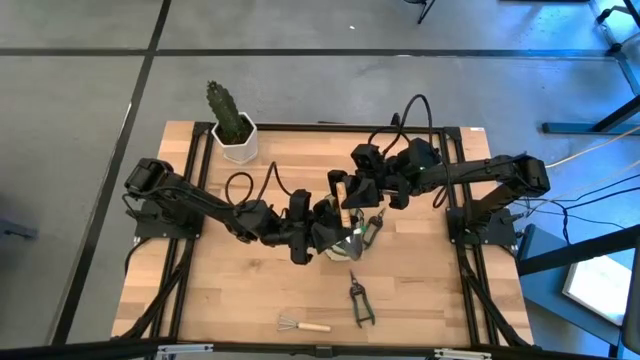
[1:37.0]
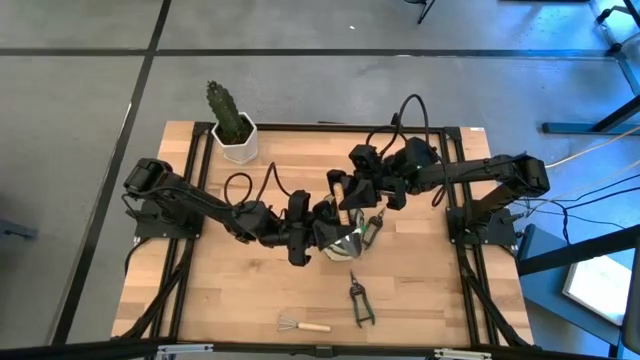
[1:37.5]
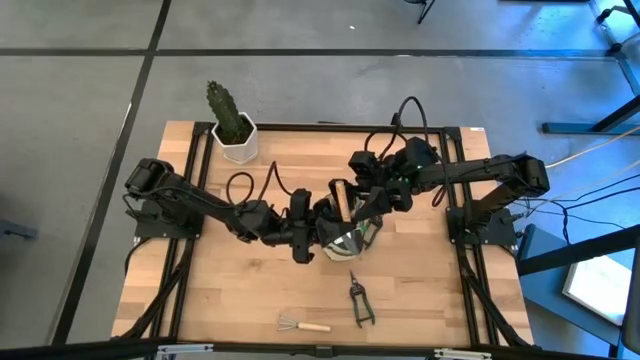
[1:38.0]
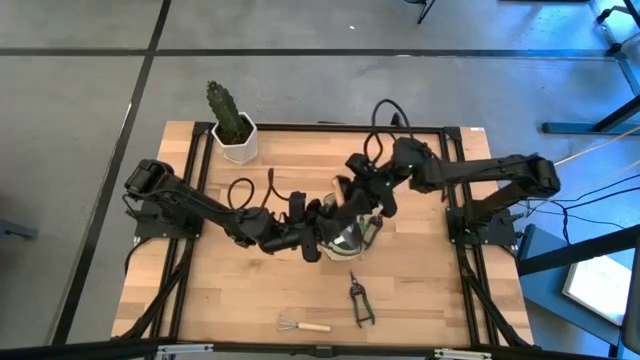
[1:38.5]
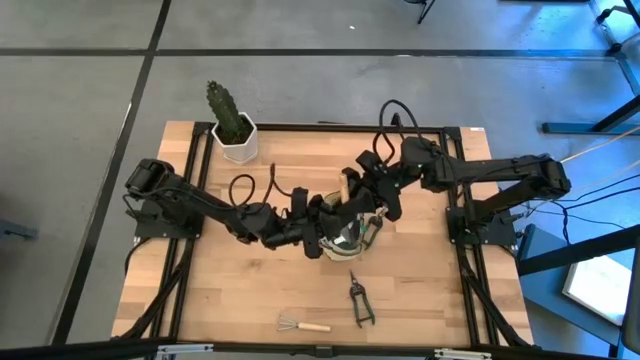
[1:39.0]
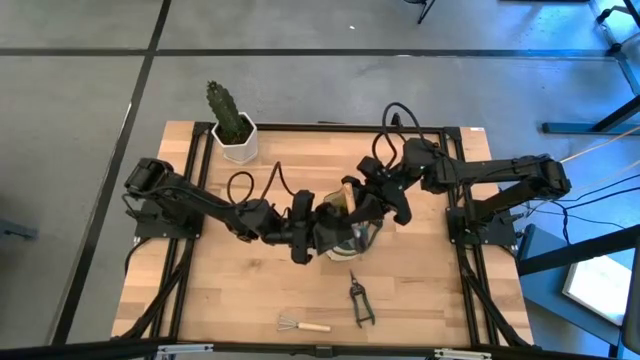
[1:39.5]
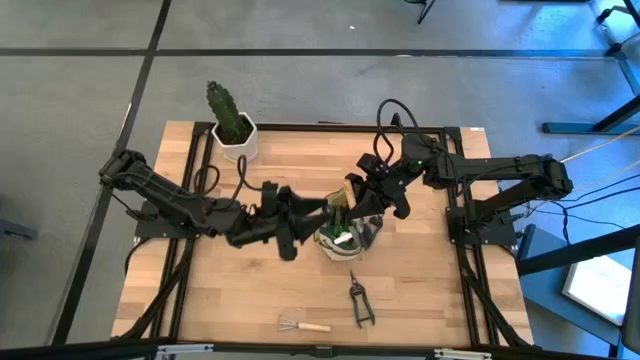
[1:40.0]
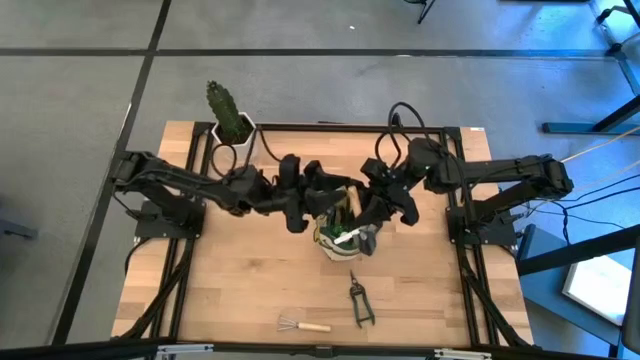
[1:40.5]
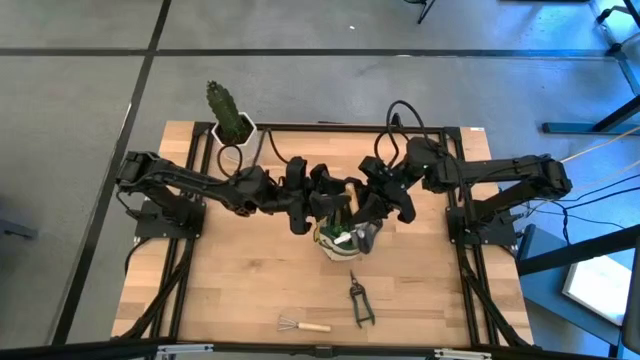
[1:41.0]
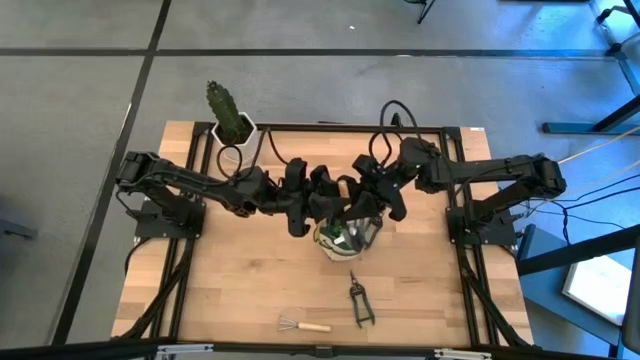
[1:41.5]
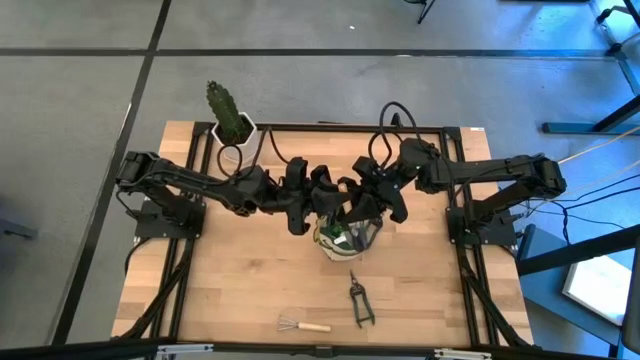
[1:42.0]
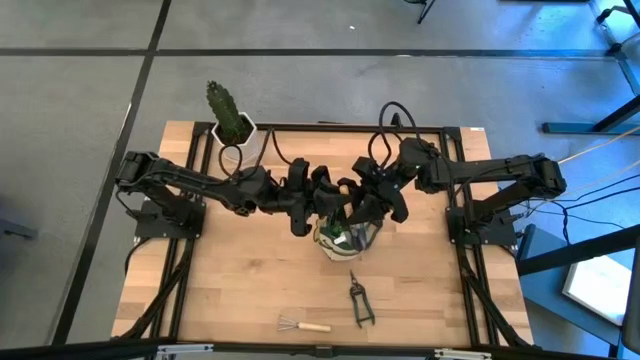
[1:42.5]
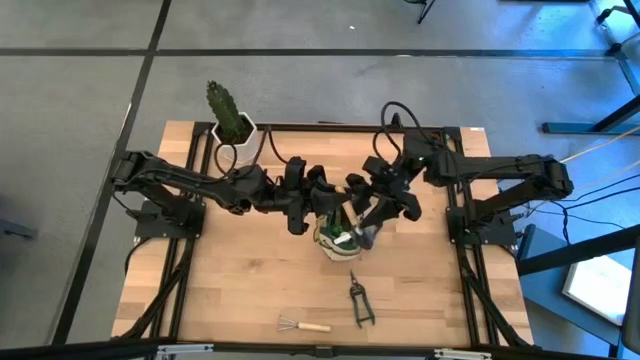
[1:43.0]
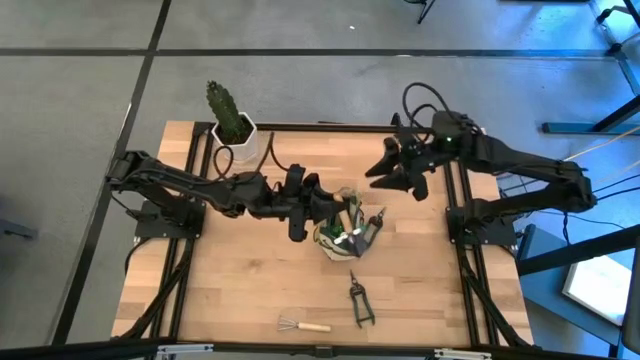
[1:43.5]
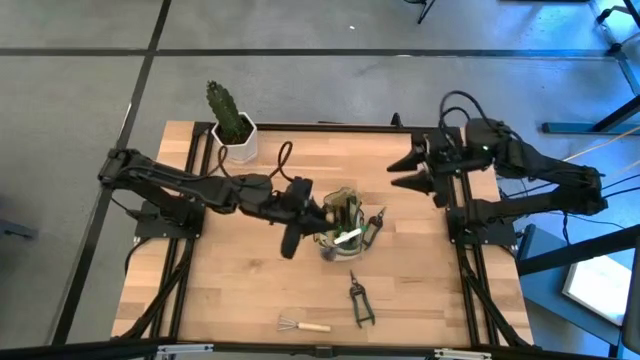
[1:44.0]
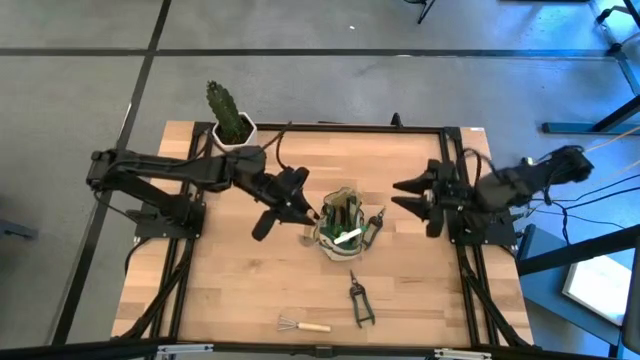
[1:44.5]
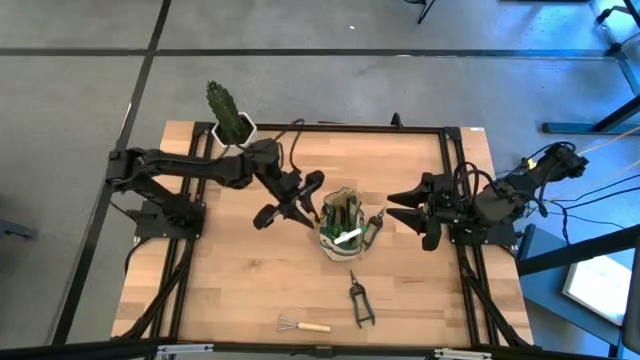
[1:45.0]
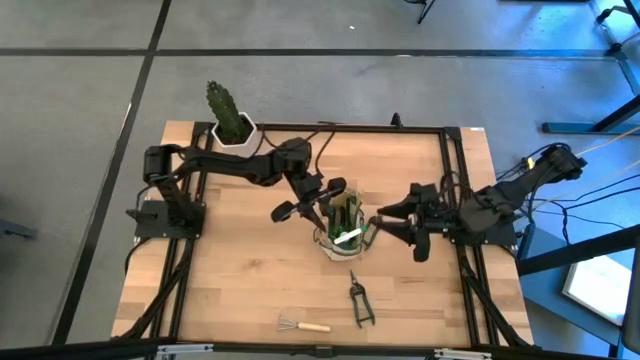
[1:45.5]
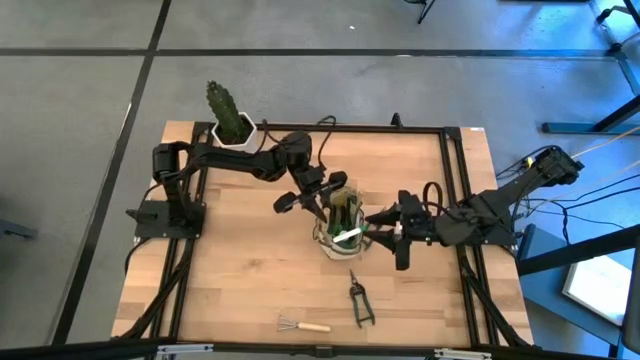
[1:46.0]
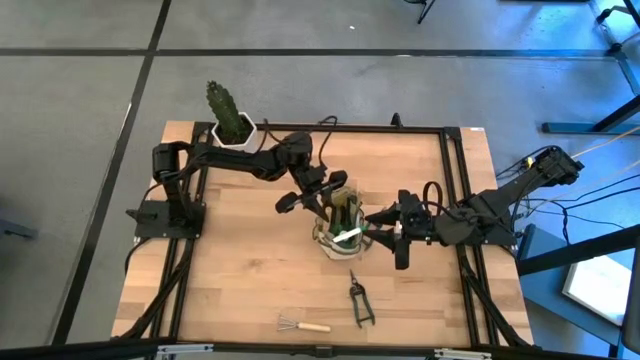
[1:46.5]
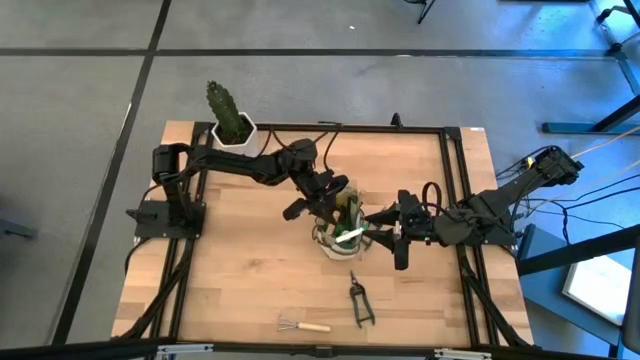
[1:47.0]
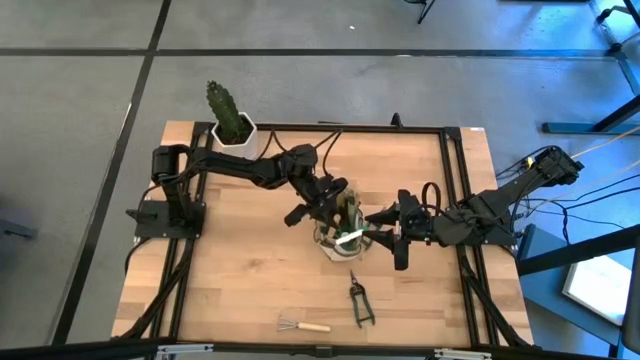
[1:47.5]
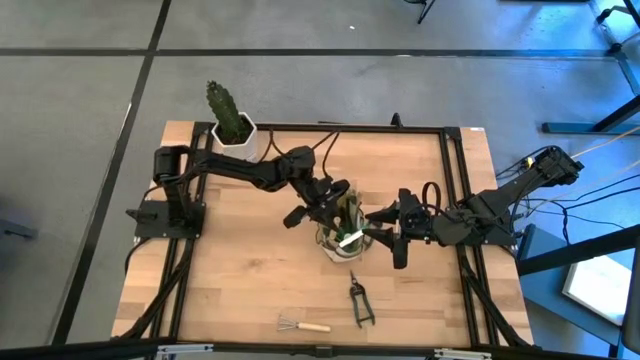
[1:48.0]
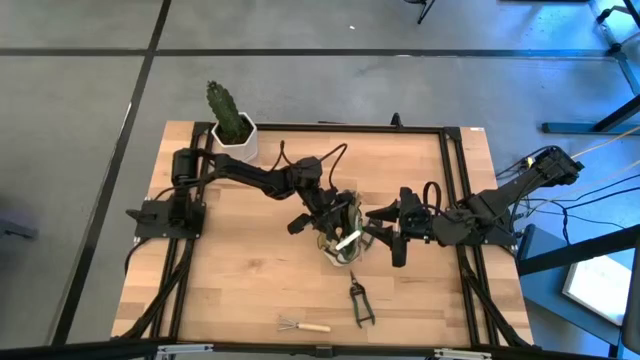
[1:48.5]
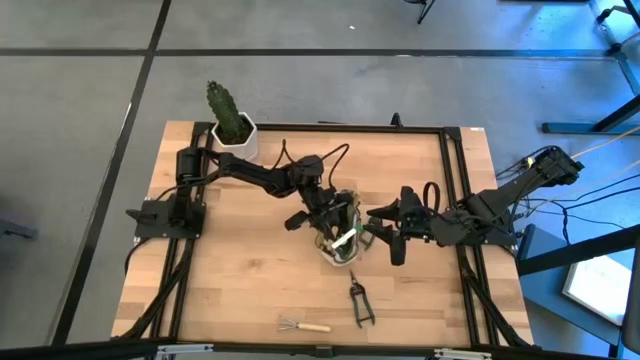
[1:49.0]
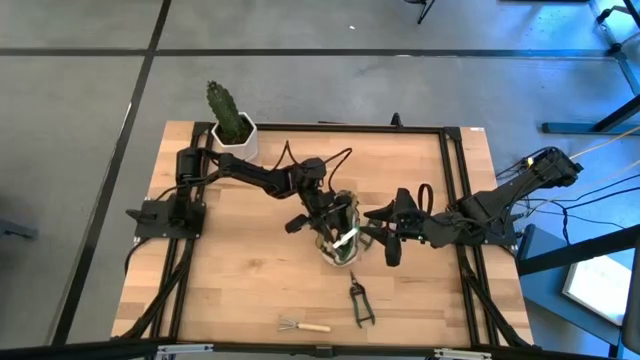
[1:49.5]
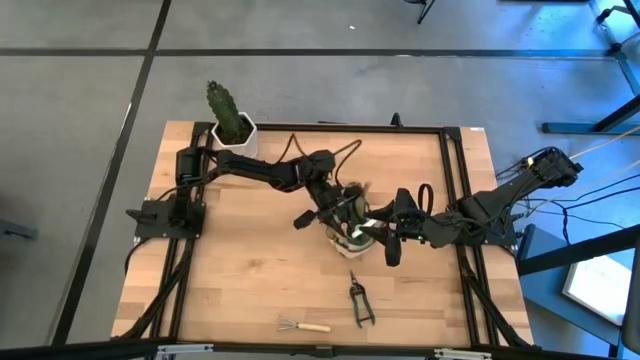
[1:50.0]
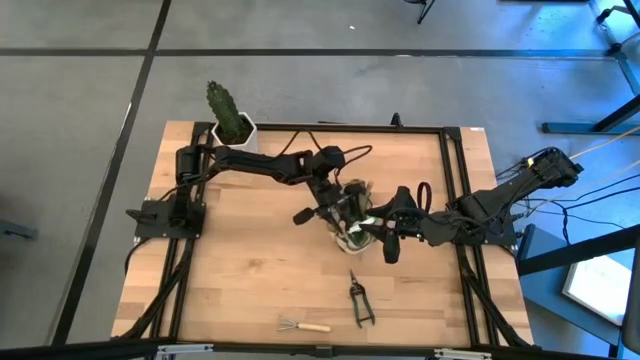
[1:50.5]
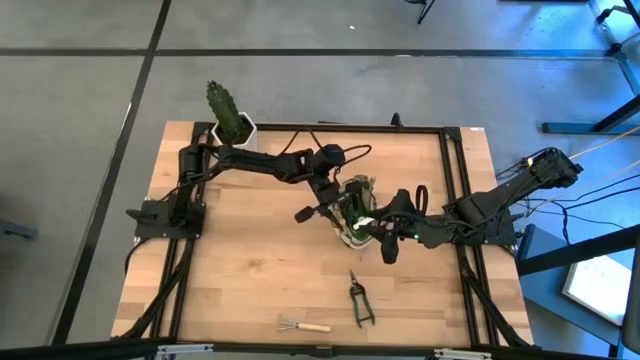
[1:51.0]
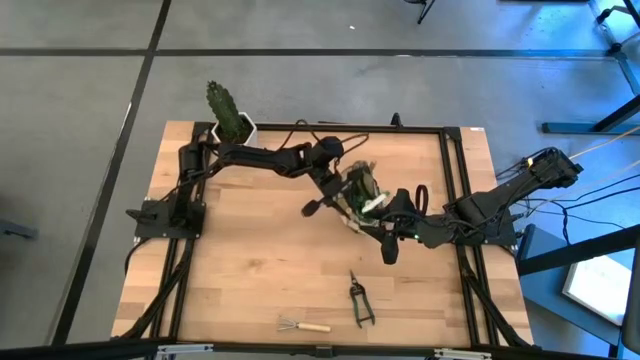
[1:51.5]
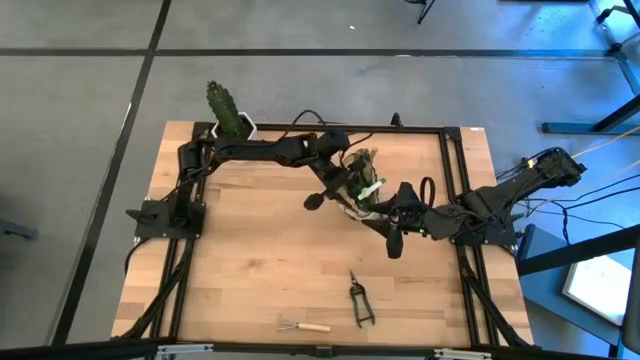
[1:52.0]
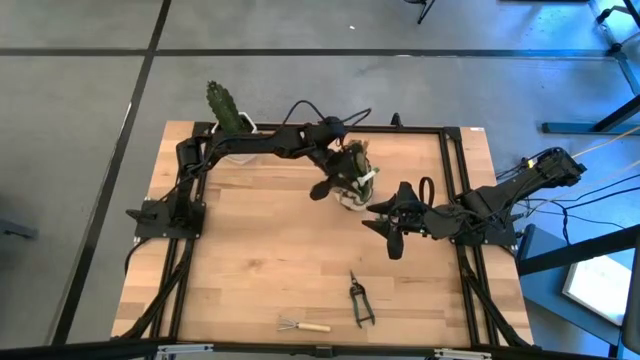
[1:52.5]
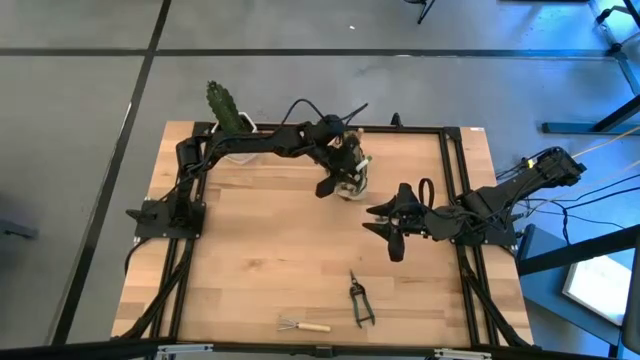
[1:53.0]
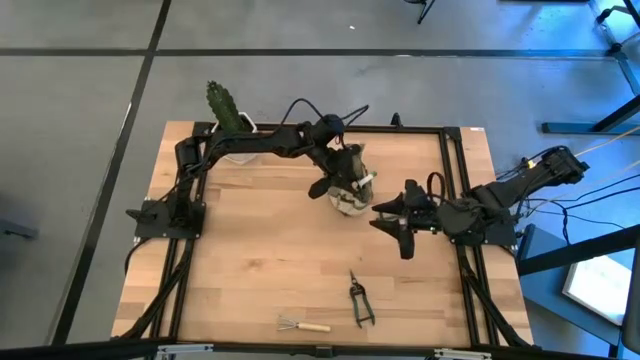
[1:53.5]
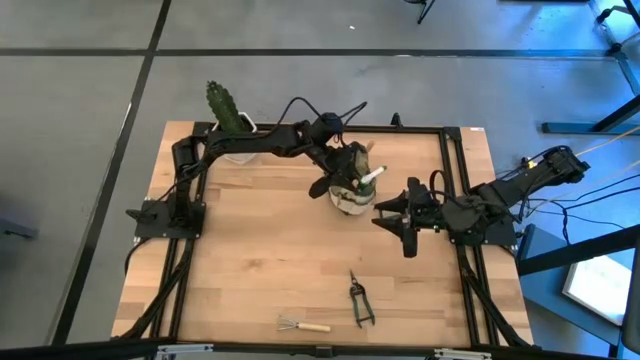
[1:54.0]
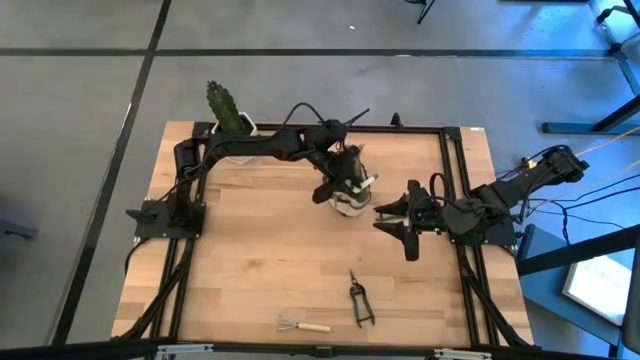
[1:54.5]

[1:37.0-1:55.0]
Task: Pick & Place Garden tools in Gardening bag
Put the trowel into the gardening bag

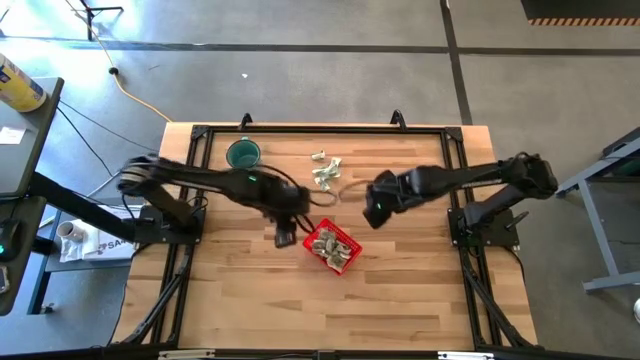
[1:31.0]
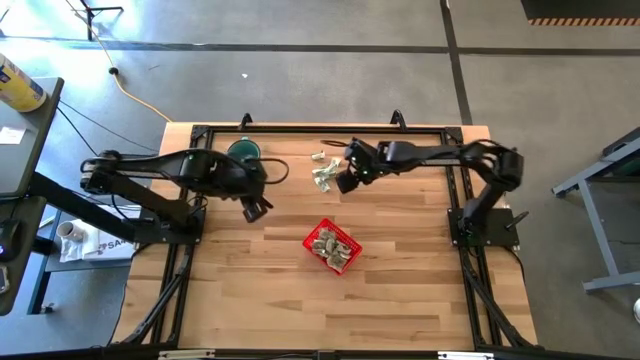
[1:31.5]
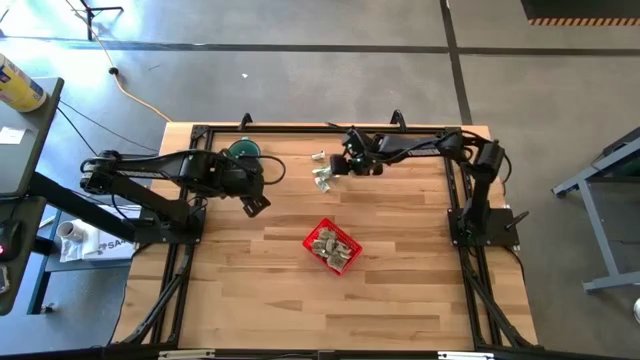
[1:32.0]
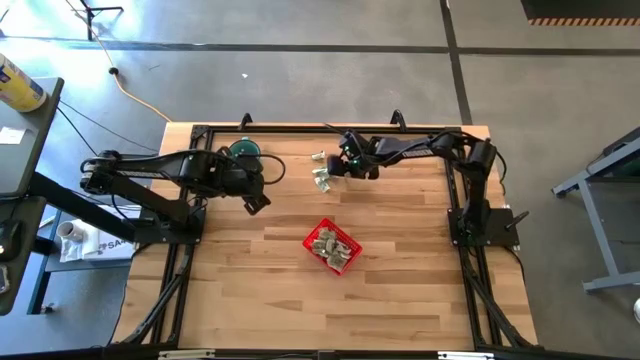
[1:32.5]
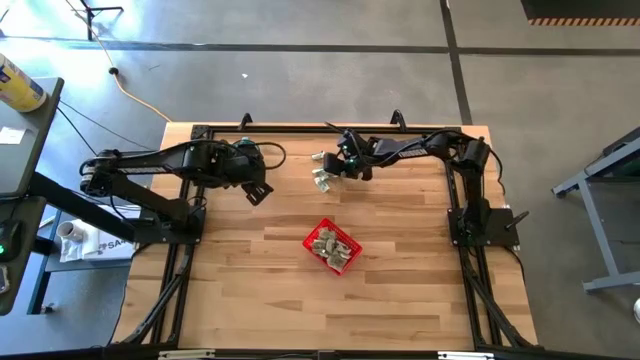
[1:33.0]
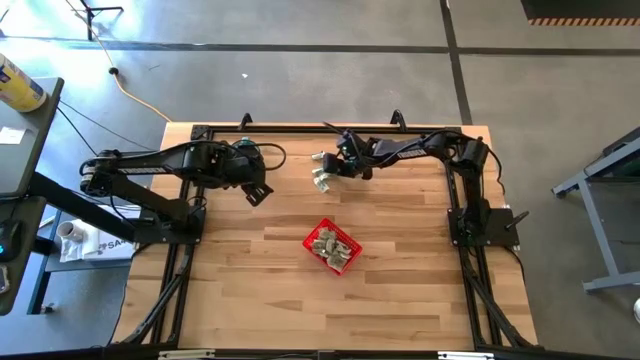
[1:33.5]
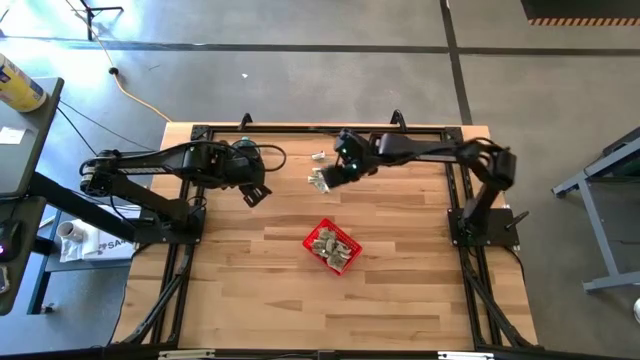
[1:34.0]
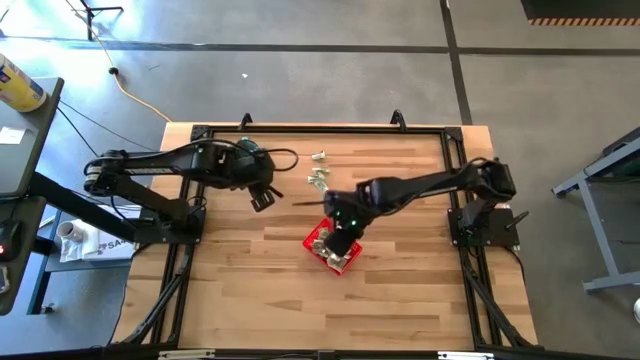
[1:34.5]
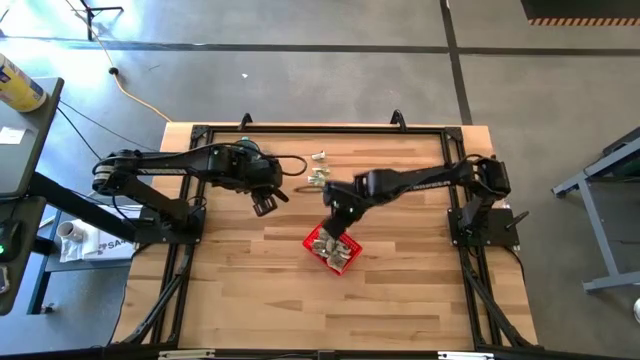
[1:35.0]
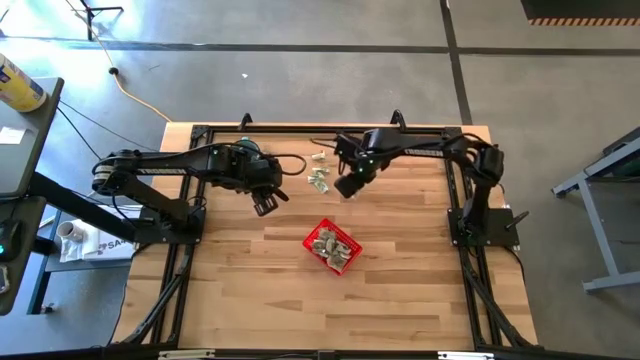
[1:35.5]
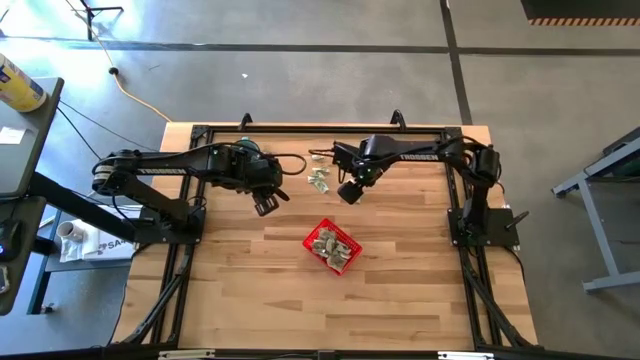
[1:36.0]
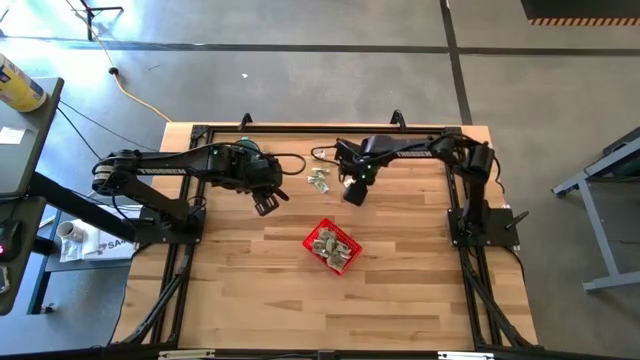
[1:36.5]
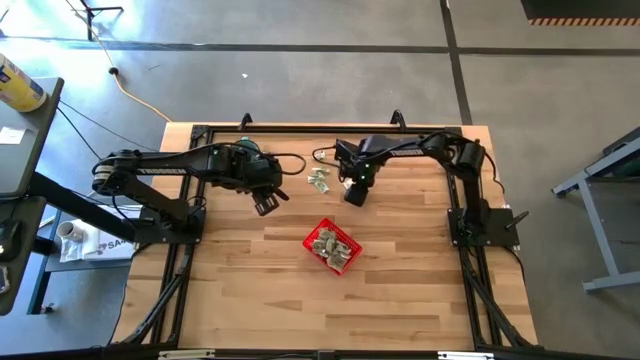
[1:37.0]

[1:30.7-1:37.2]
Task: Pick and place Stevia / Truvia into bins
Put the light green stevia packet into the bin
